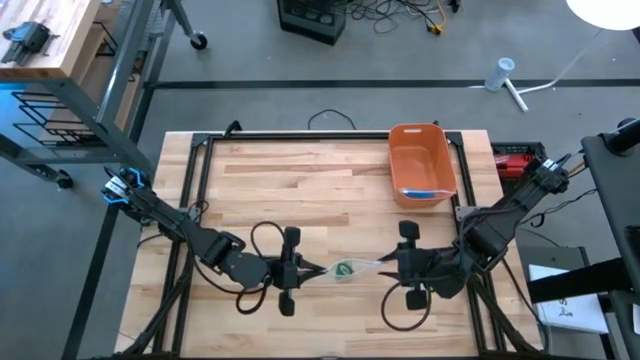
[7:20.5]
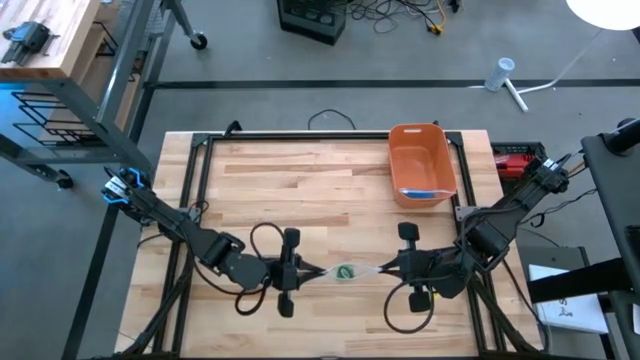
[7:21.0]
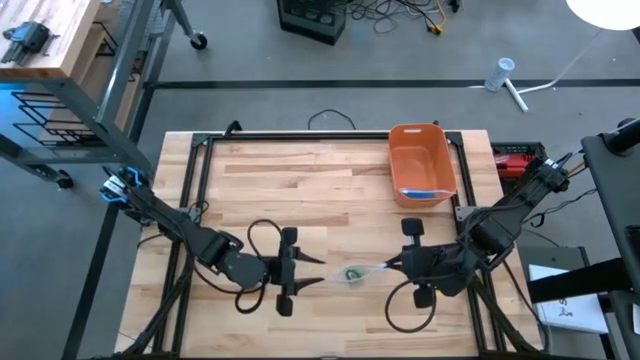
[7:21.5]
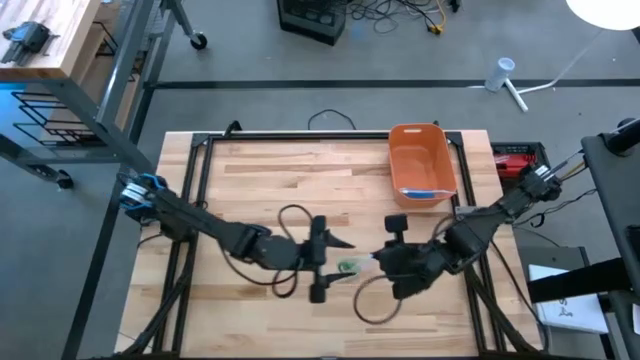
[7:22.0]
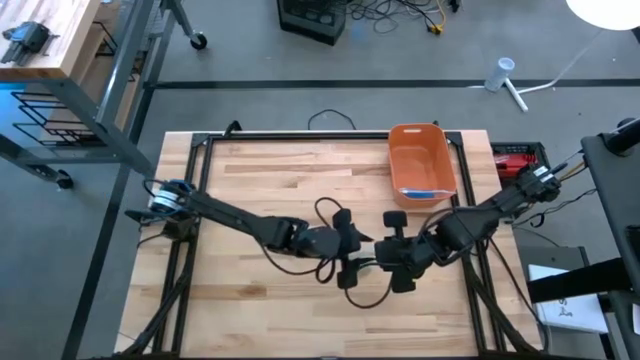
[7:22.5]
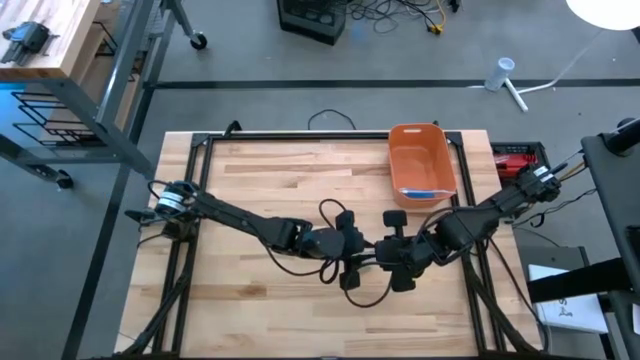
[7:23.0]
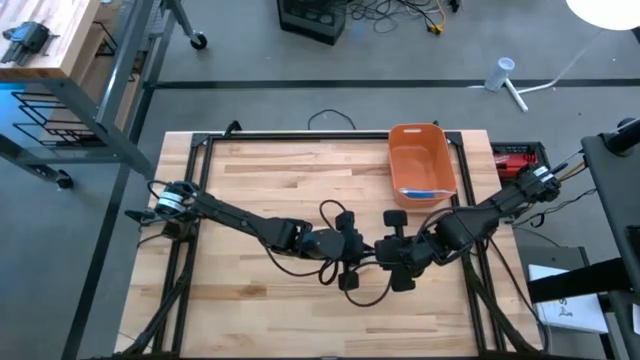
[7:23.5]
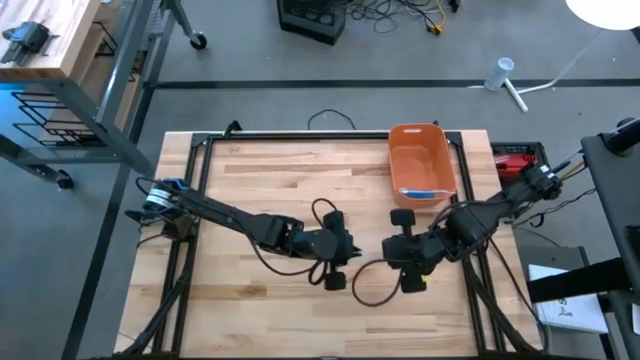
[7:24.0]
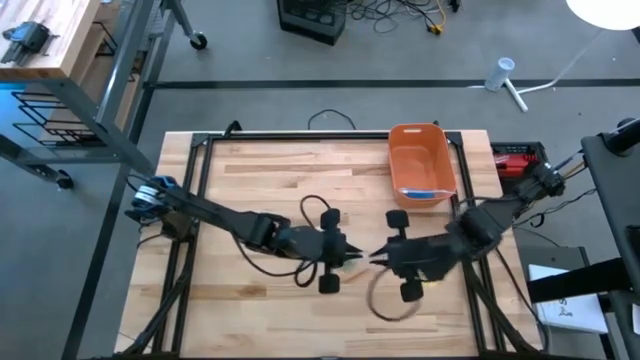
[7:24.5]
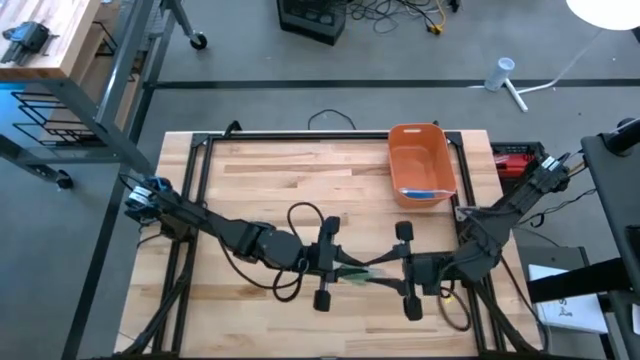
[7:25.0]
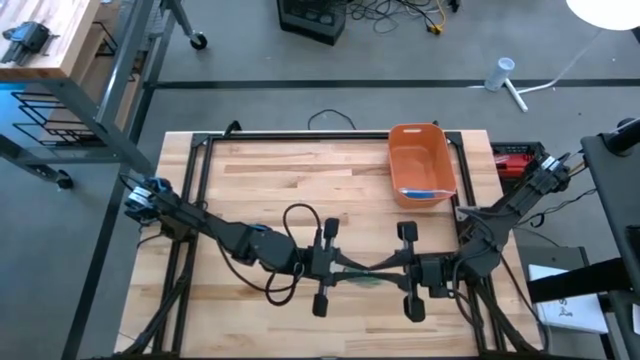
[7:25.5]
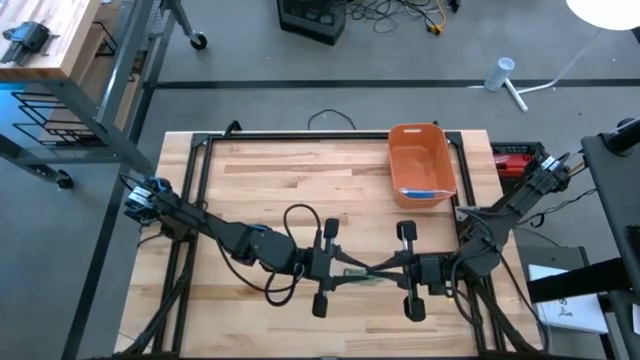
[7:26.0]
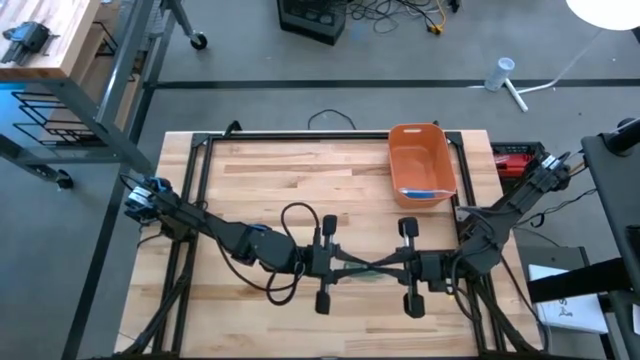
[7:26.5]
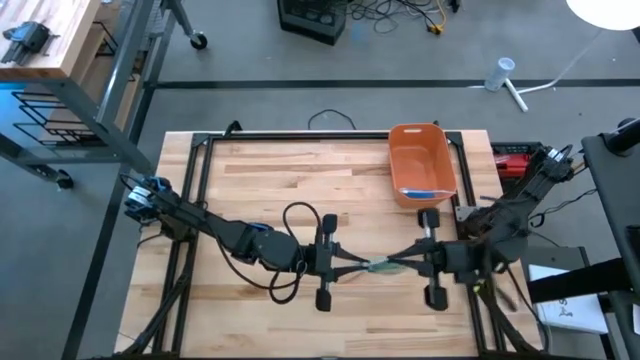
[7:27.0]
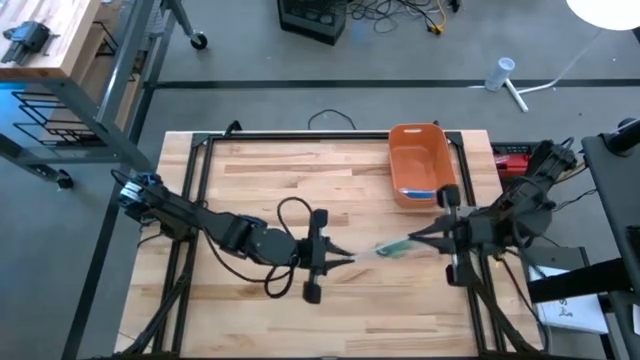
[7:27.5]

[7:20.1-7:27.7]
Task: Roll bandage
Close the zip bag

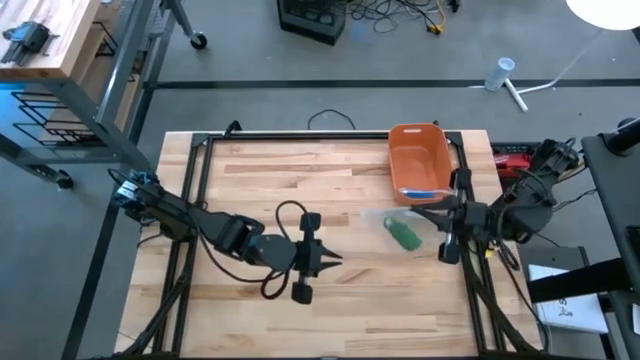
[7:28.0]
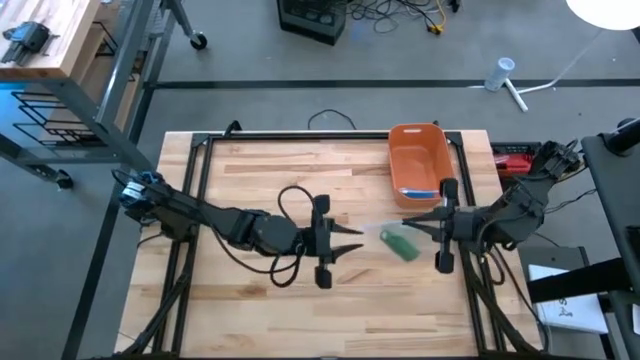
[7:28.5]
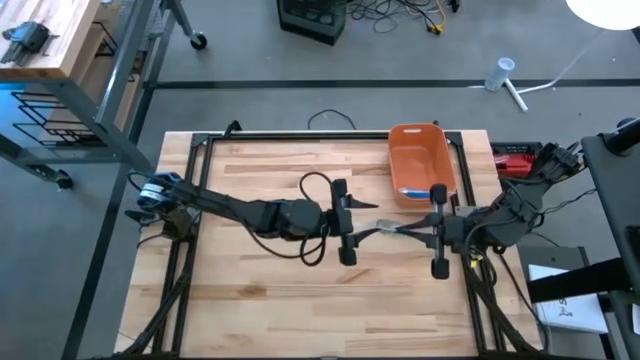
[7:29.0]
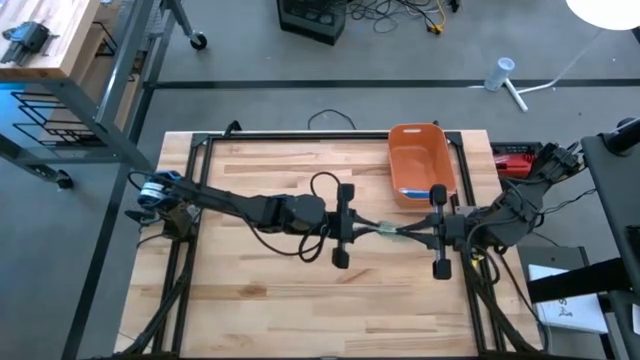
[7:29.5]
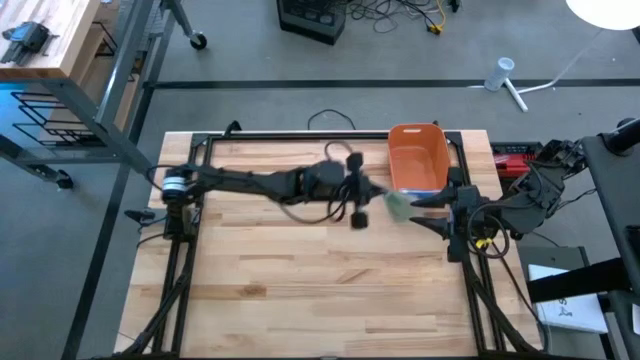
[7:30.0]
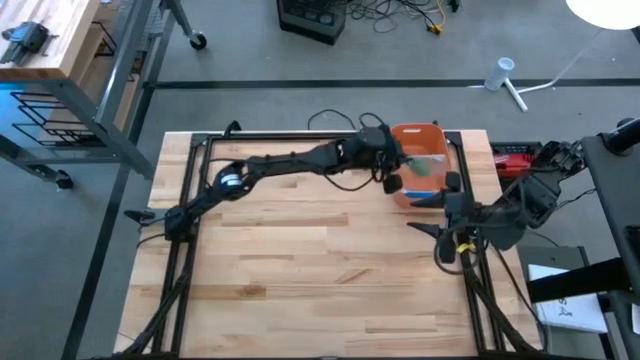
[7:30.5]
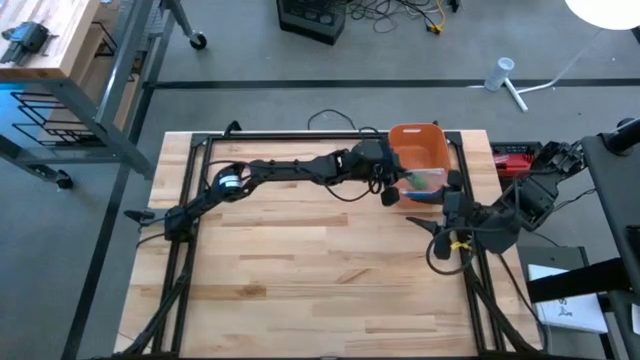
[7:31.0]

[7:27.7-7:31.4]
Put the zip bag into the orange bin

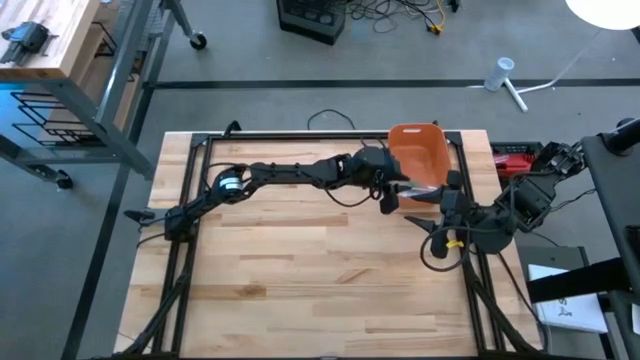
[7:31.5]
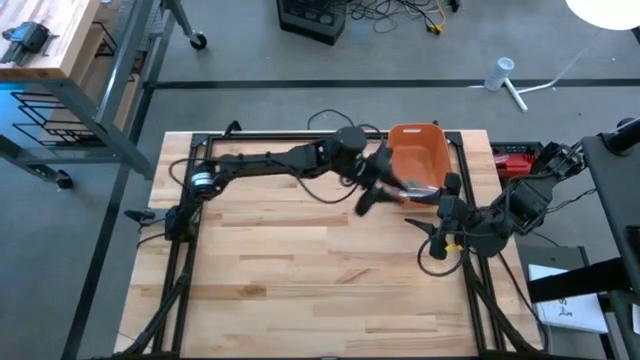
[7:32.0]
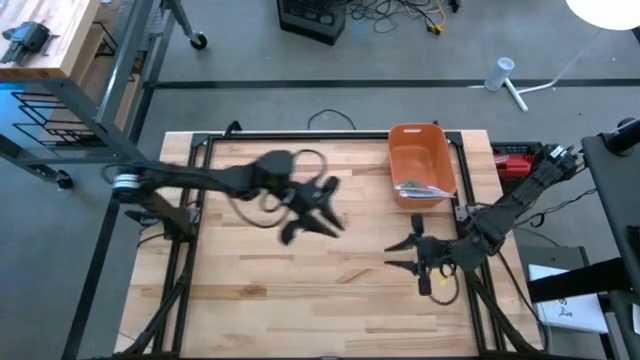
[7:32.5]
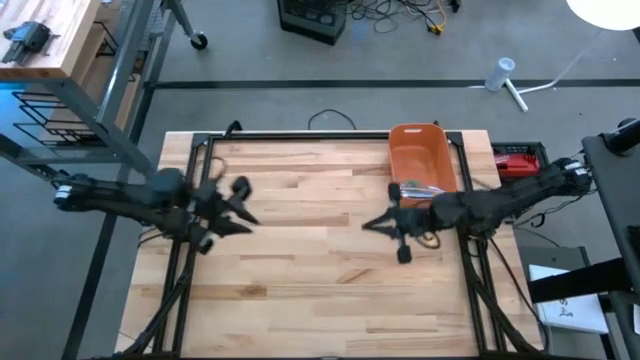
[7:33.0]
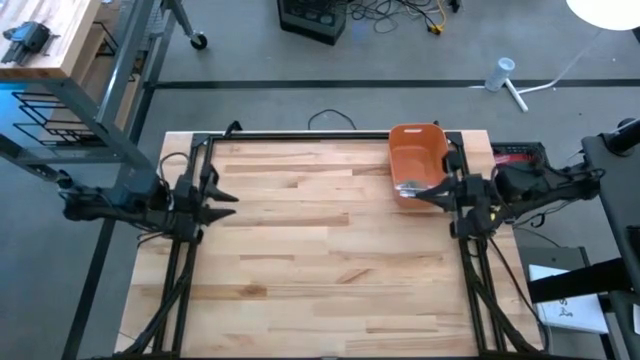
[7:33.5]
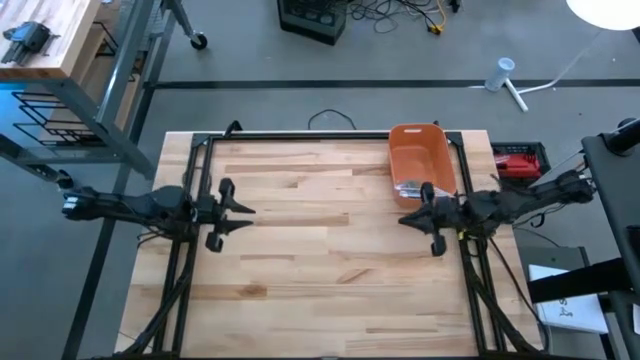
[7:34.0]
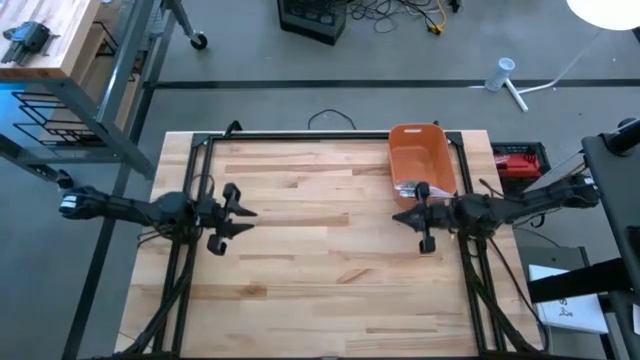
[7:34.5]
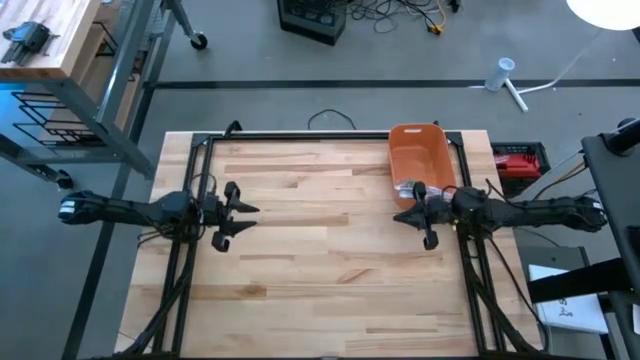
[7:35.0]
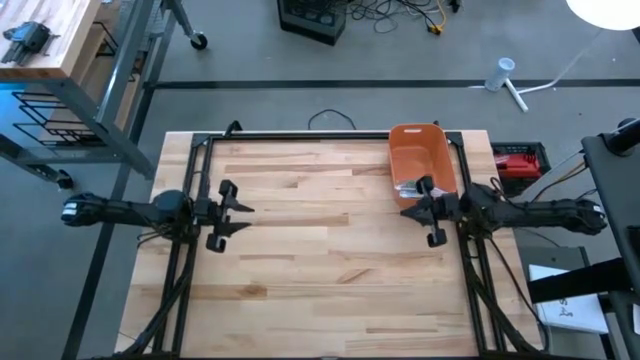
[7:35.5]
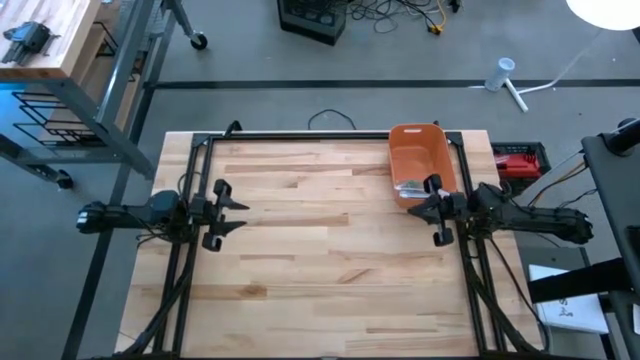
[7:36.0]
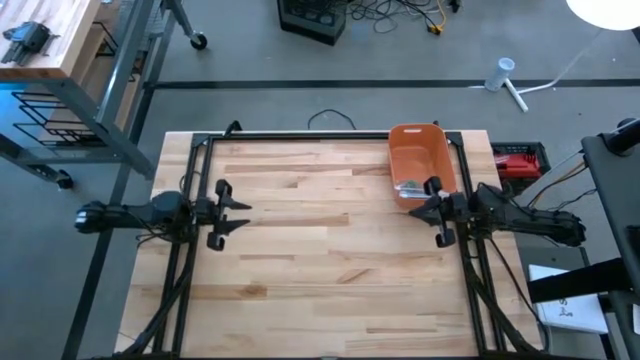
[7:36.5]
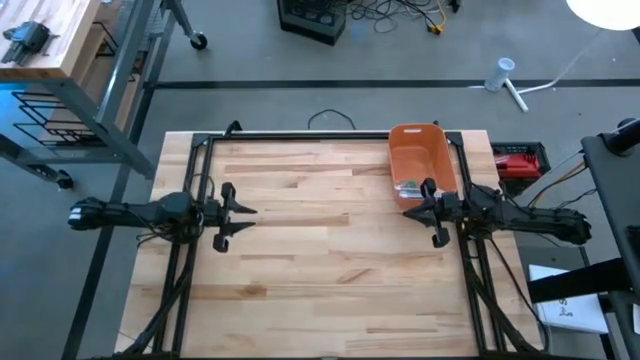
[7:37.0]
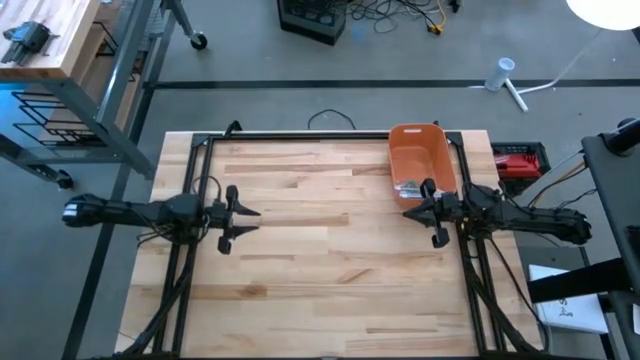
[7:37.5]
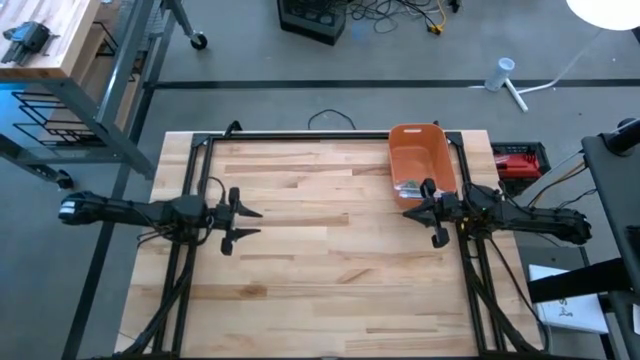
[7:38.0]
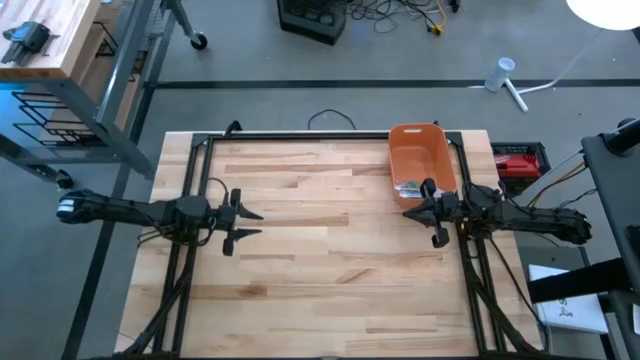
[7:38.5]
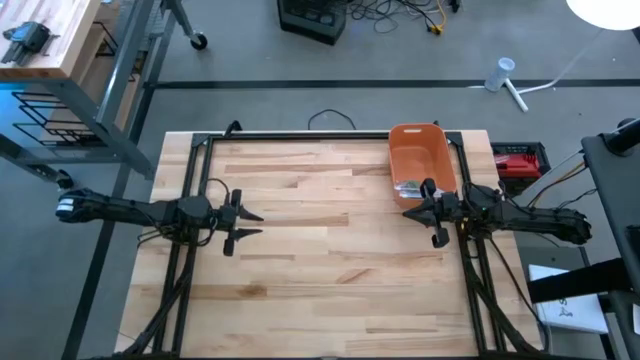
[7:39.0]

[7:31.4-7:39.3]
Return to Home Position

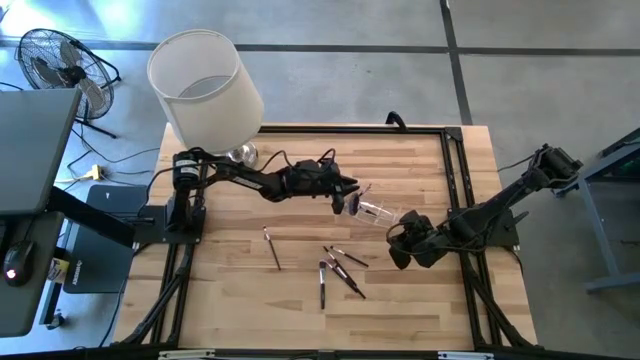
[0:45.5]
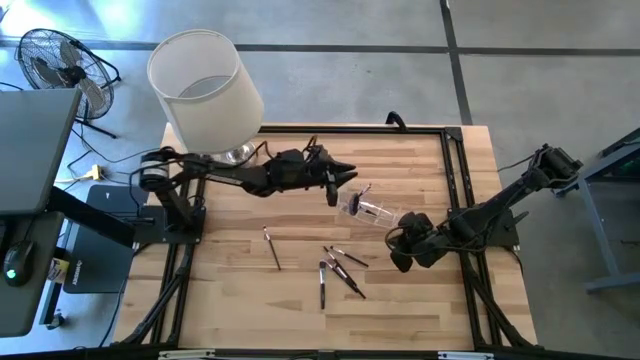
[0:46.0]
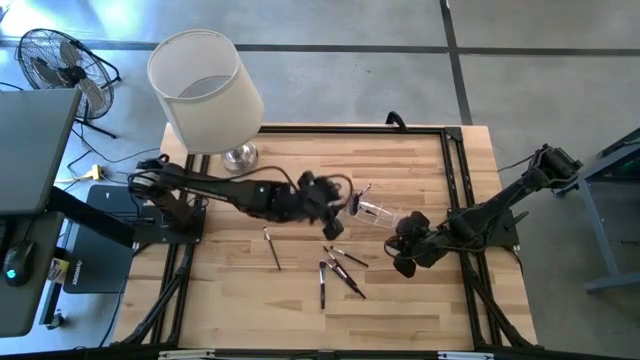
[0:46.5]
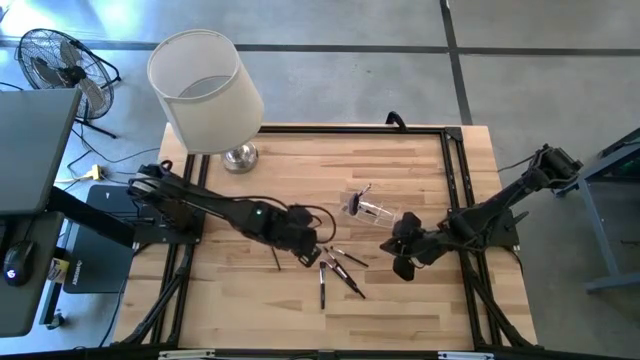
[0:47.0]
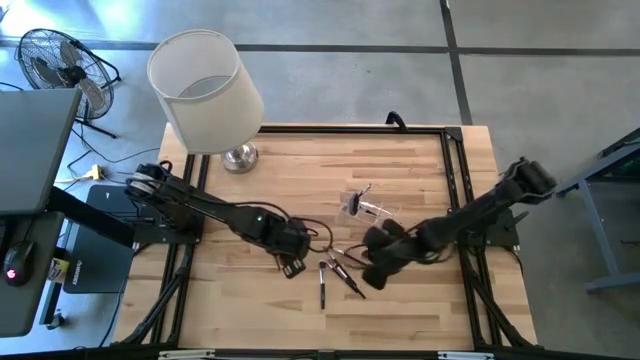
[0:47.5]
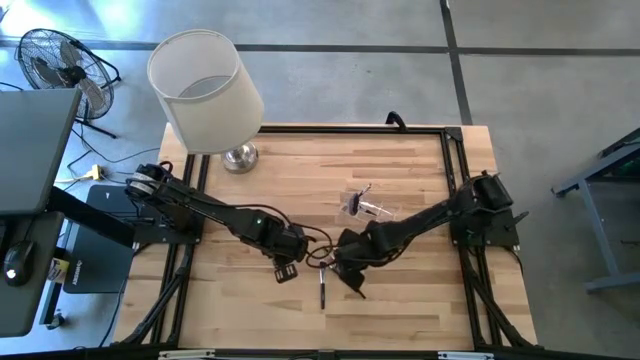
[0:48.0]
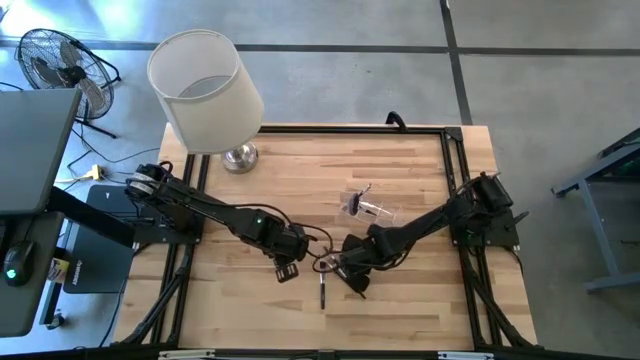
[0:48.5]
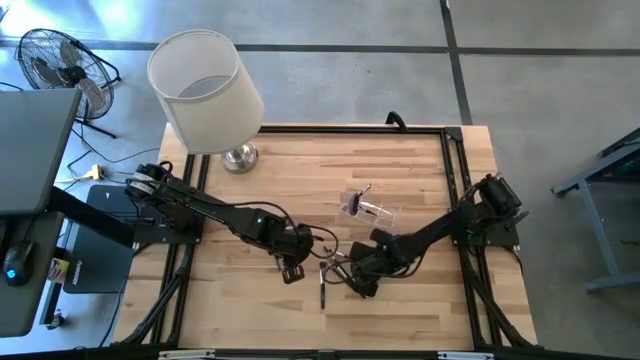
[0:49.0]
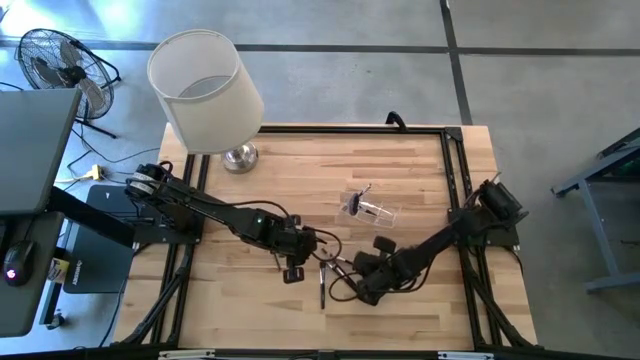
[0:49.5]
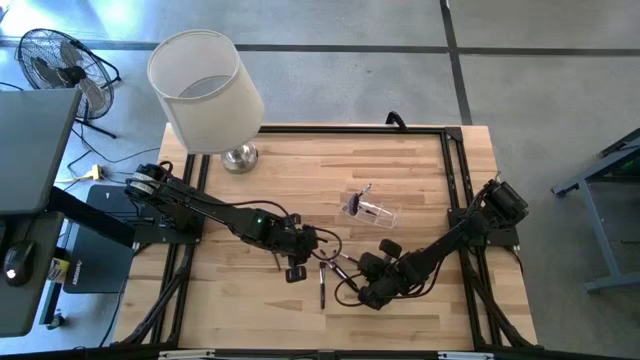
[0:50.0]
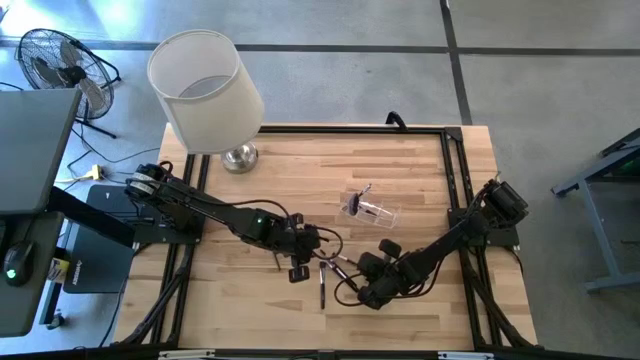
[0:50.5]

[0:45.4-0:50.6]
Task: Put items in baskets/containers
Put the black eyeshadow brush into the transparent organizer
